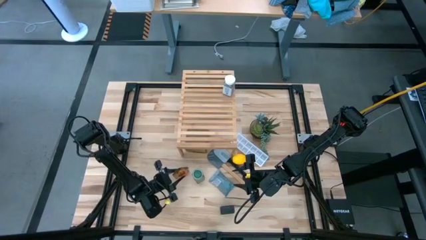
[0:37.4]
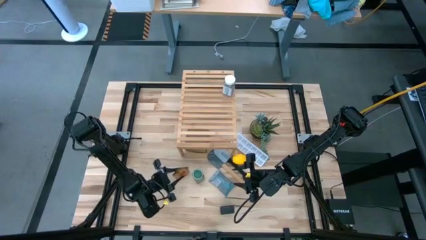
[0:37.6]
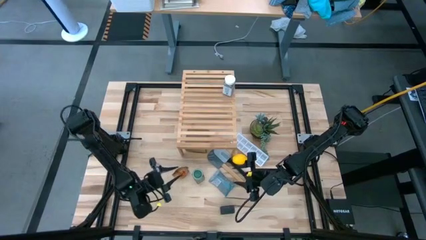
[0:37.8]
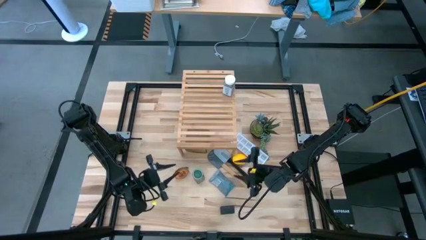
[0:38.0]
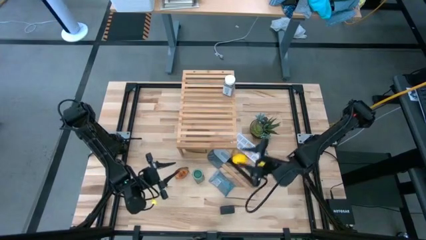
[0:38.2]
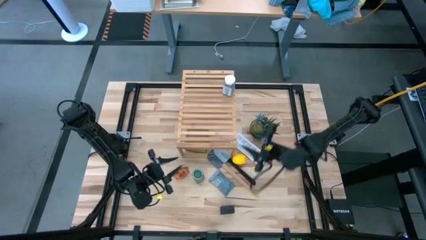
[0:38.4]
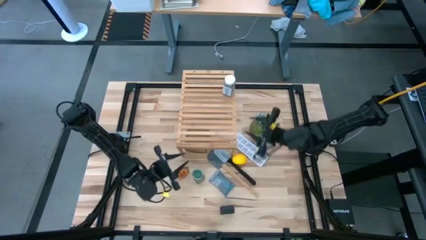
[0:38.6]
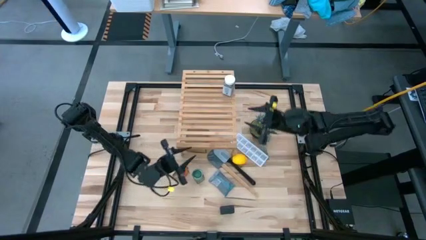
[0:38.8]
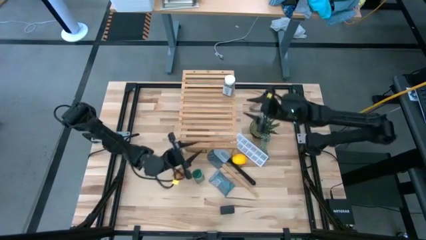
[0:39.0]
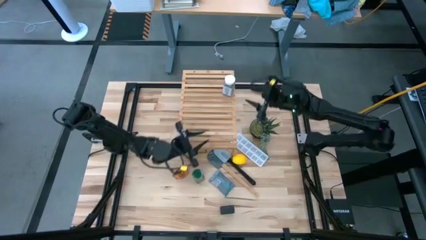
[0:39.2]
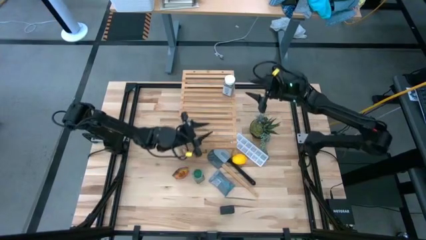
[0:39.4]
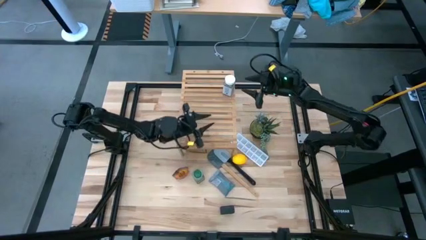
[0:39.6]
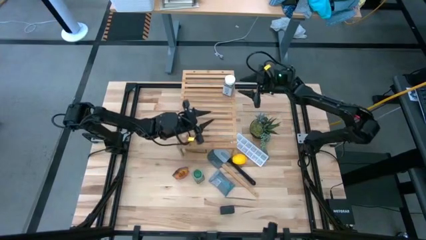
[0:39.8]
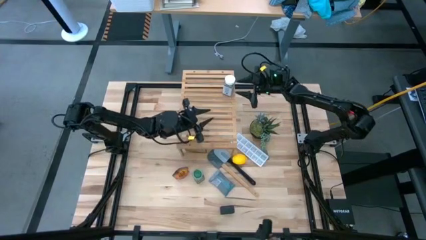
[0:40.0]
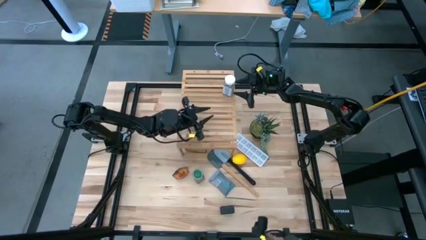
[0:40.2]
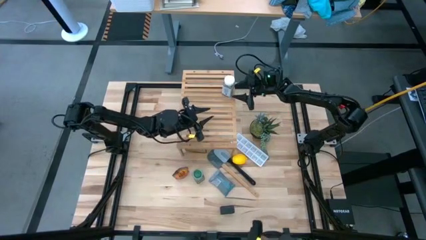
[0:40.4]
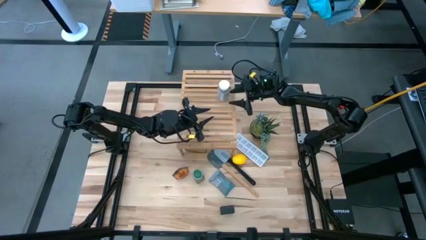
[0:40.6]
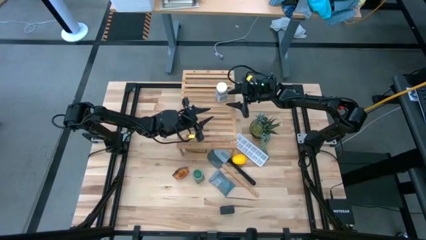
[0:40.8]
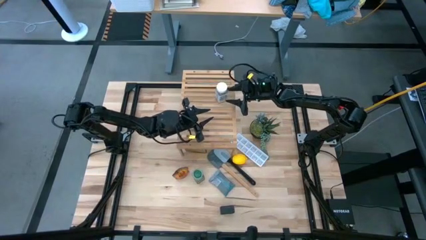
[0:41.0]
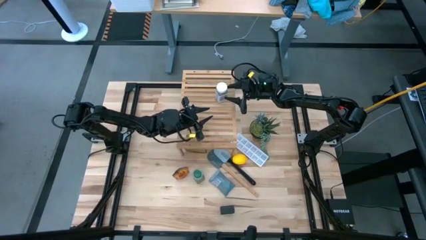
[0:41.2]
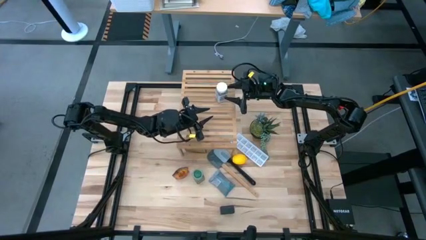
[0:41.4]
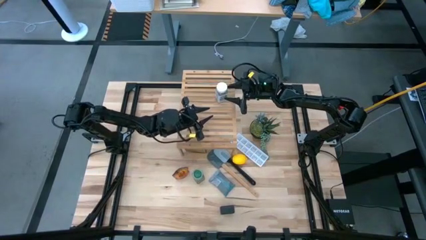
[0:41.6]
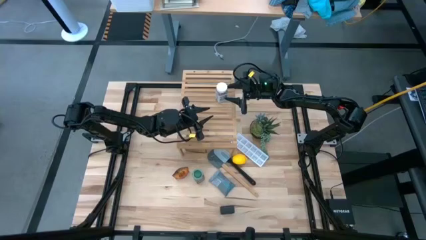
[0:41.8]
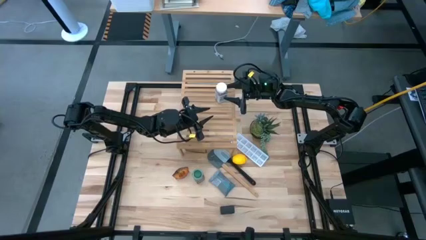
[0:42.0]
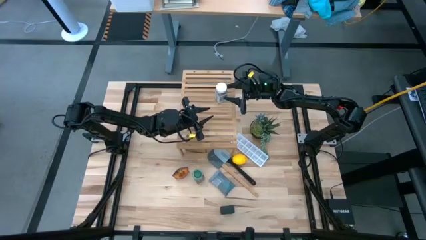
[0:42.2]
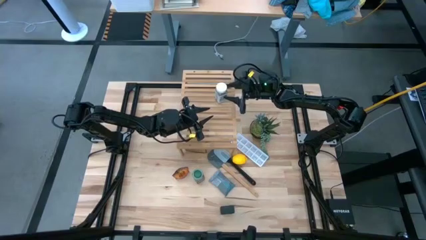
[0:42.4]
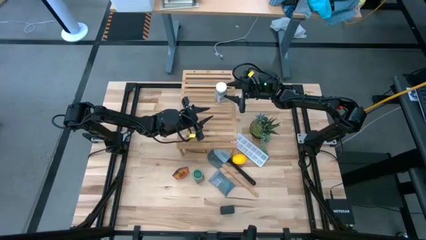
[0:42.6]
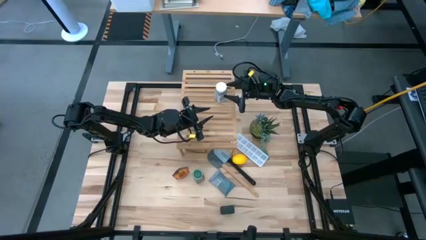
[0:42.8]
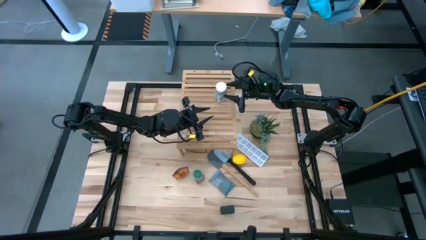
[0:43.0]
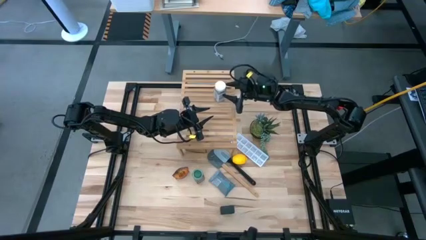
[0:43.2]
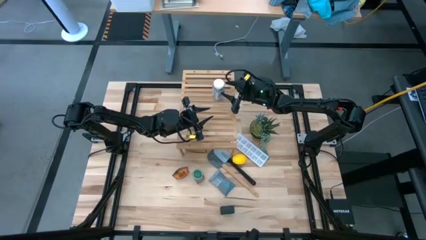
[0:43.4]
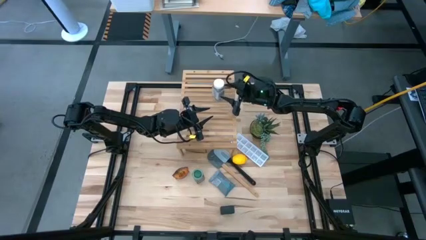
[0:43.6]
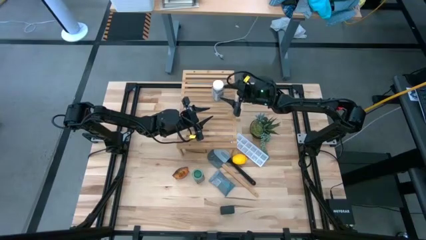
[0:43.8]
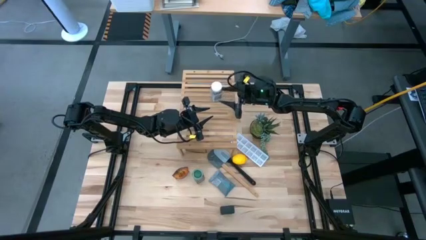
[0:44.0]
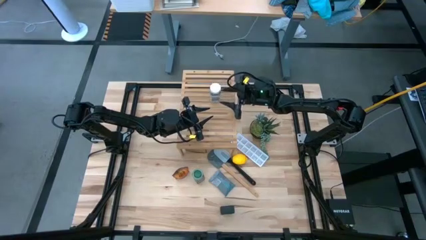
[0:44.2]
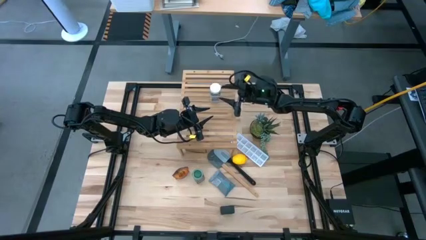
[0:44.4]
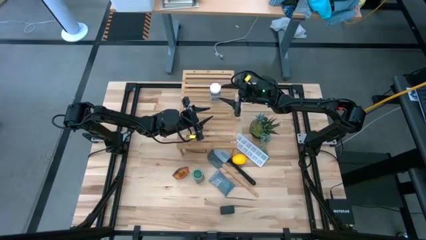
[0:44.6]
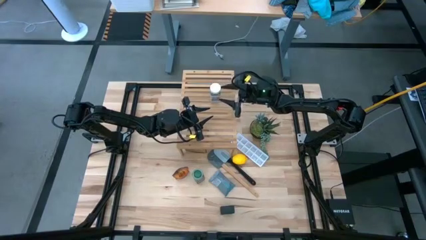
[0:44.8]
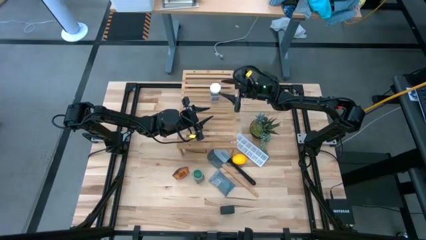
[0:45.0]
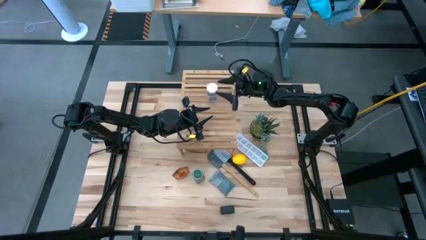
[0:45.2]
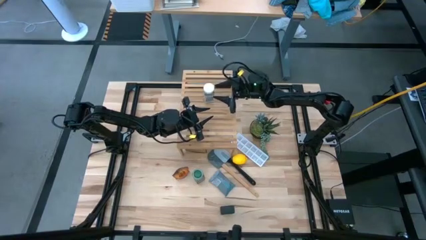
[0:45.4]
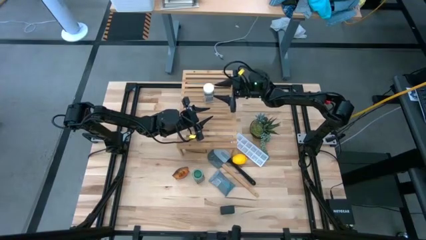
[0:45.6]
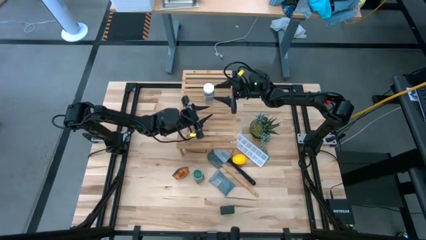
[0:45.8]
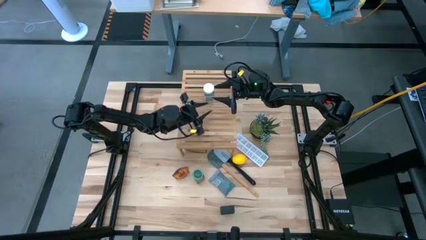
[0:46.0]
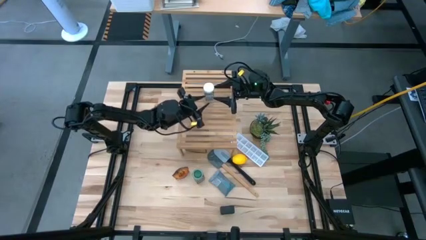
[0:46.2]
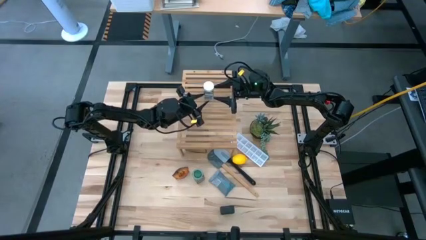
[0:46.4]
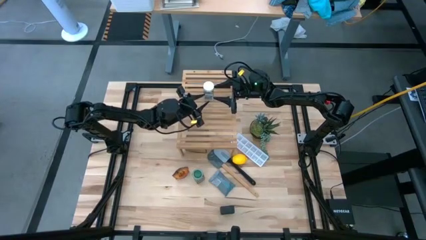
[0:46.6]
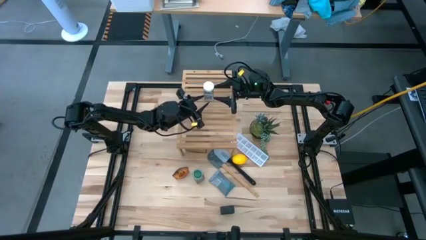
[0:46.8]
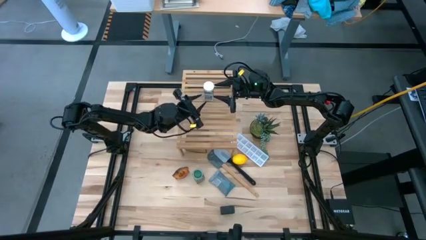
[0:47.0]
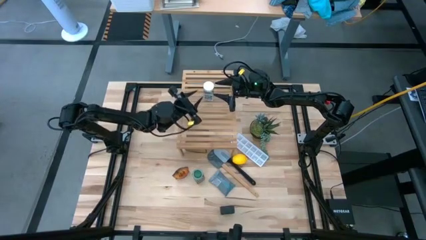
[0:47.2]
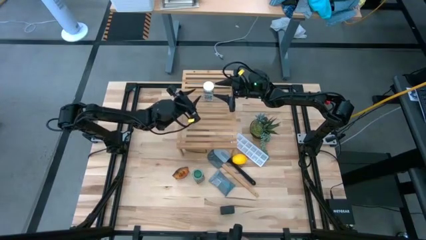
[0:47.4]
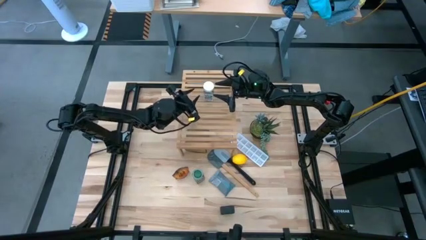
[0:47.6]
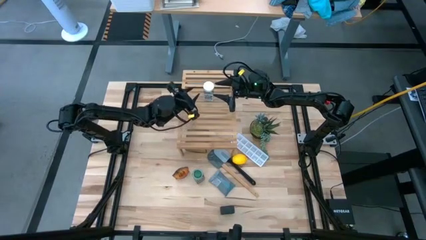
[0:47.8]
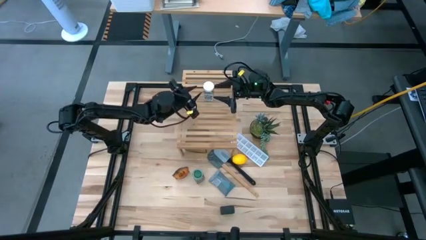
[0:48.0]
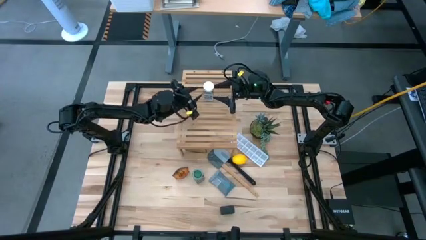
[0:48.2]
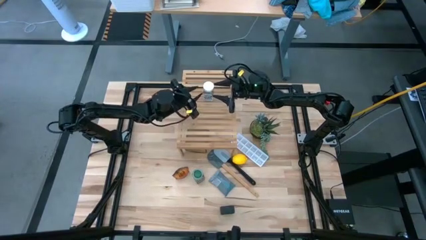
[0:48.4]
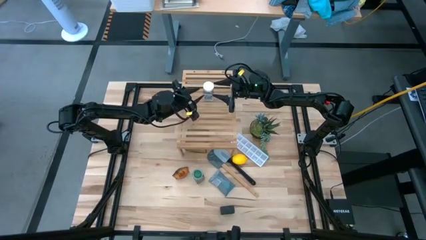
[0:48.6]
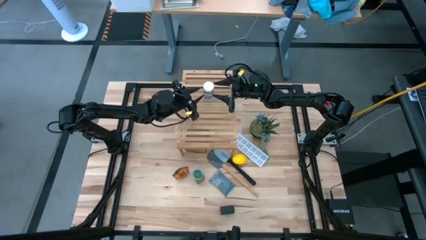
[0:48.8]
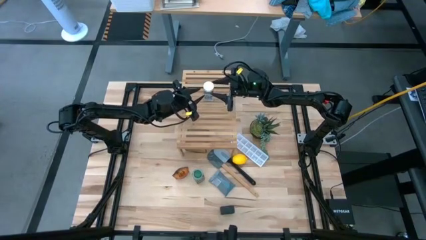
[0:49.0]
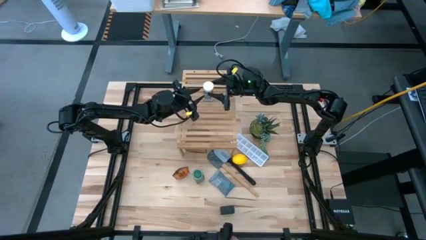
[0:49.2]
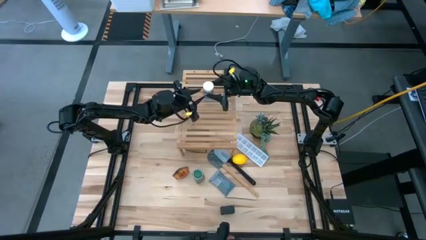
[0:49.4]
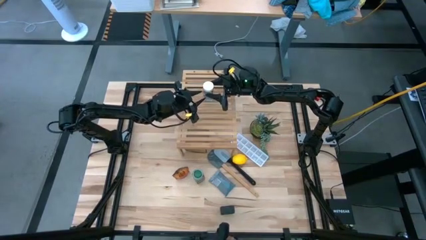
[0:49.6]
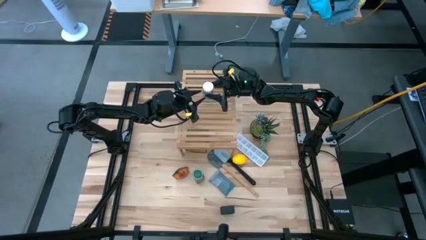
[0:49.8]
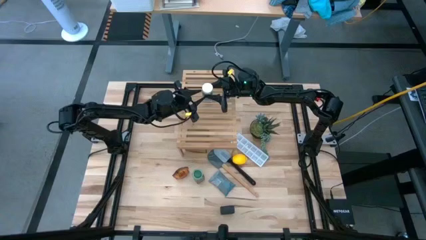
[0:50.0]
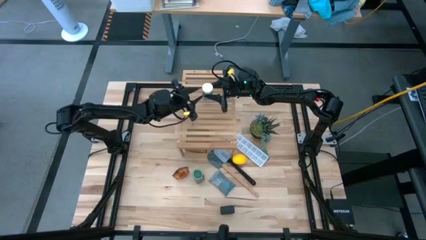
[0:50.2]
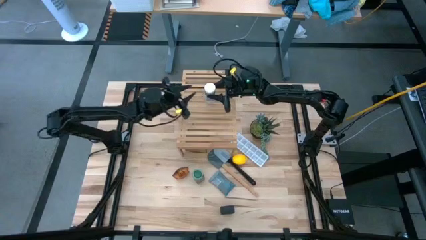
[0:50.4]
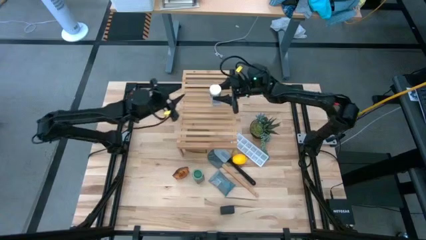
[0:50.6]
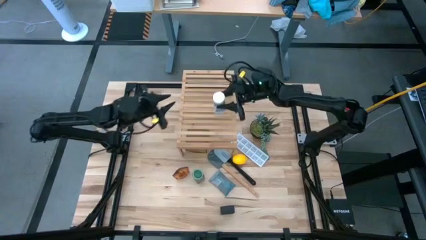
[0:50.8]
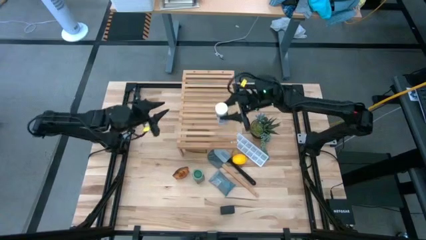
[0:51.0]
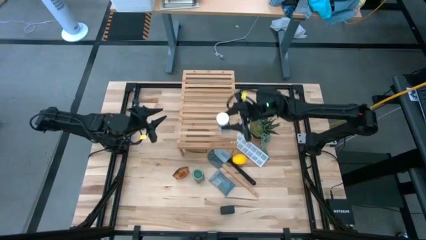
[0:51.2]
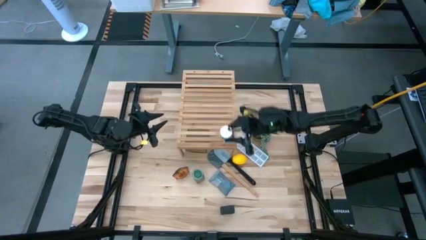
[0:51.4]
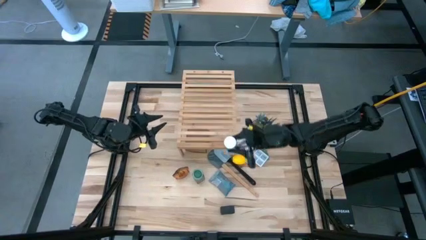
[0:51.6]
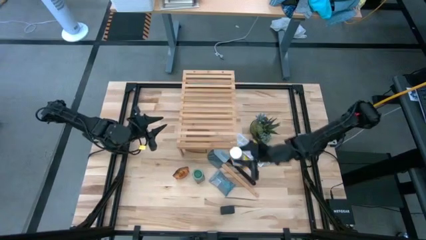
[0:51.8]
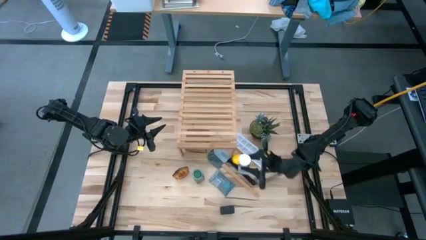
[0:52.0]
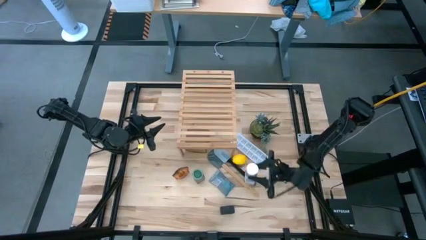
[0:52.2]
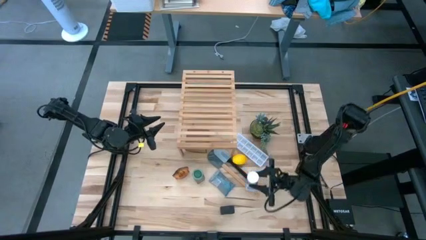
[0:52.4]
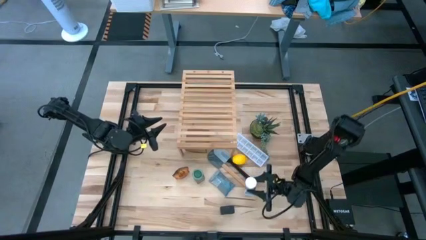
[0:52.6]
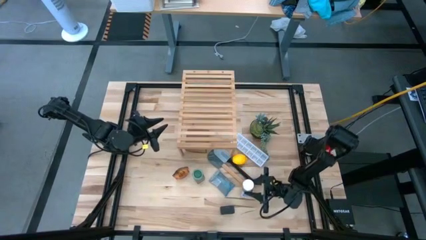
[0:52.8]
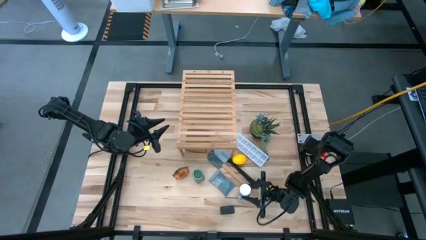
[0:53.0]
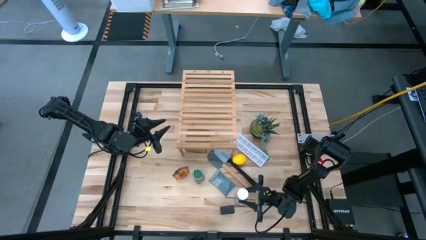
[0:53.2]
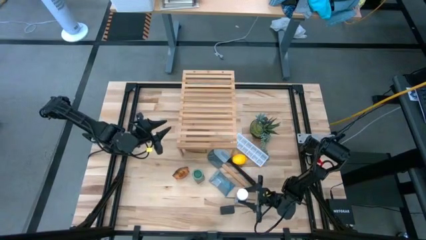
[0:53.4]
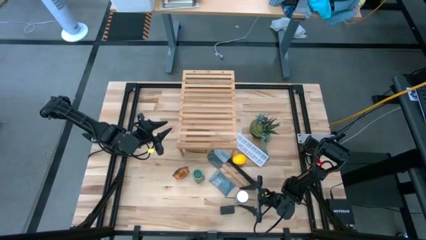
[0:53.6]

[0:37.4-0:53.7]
Task: Shelf spices
Remove the white seasoning bottle from the shelf
